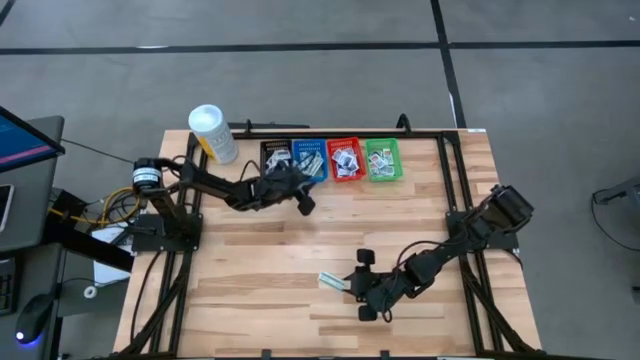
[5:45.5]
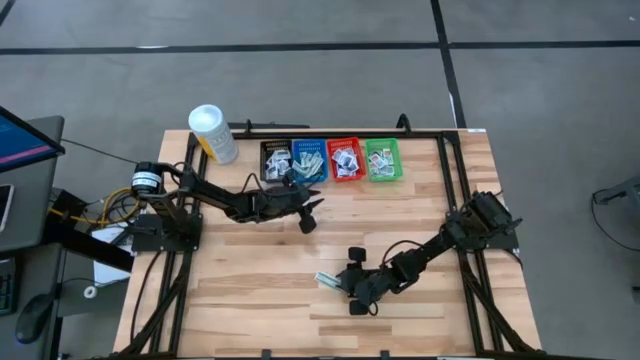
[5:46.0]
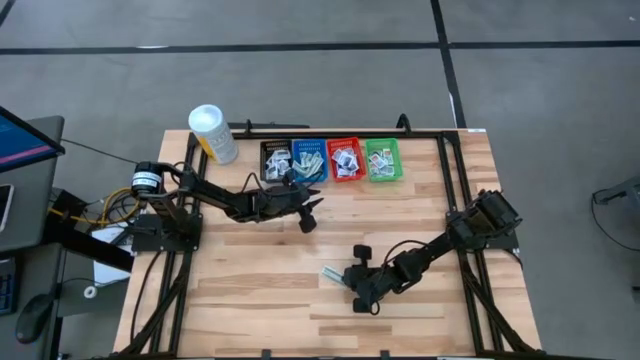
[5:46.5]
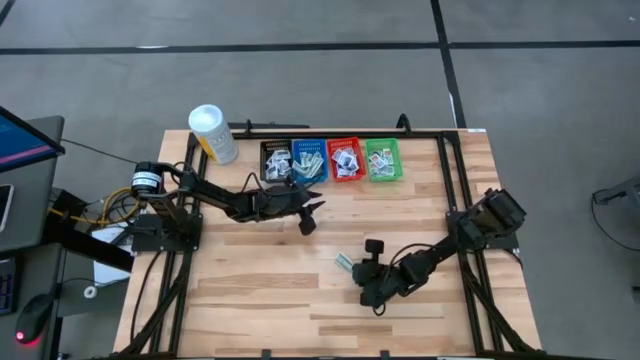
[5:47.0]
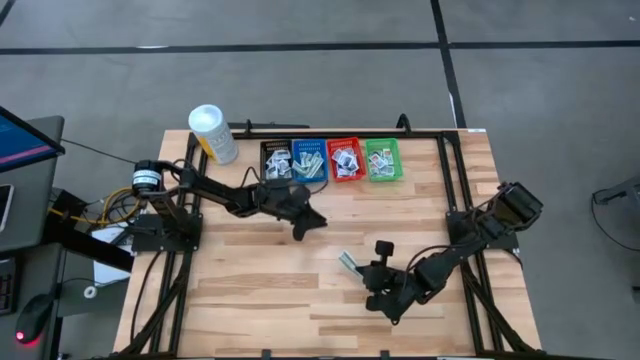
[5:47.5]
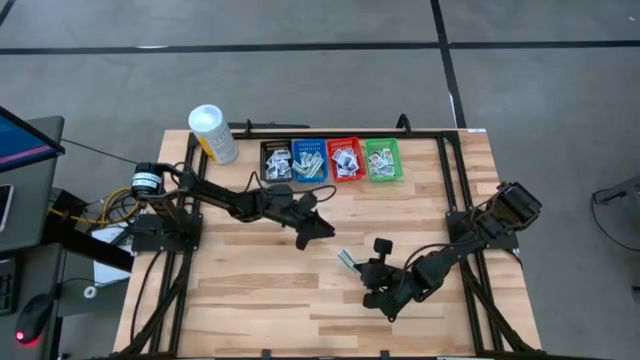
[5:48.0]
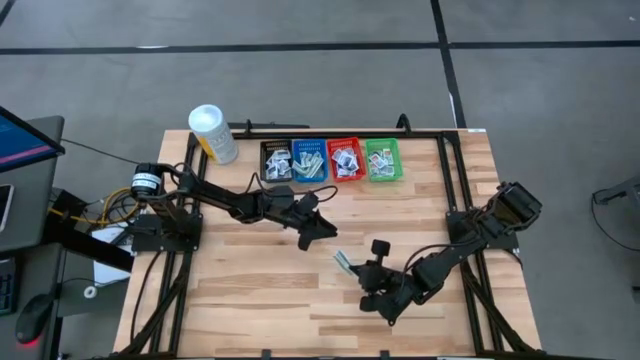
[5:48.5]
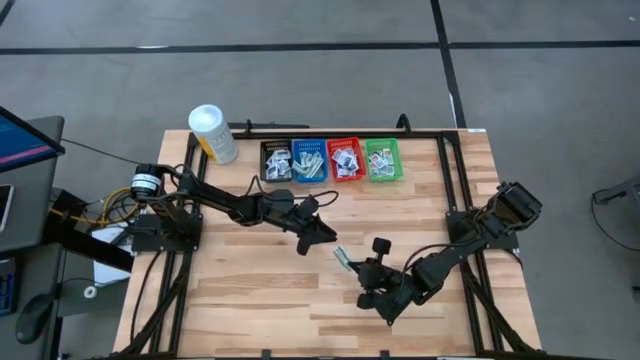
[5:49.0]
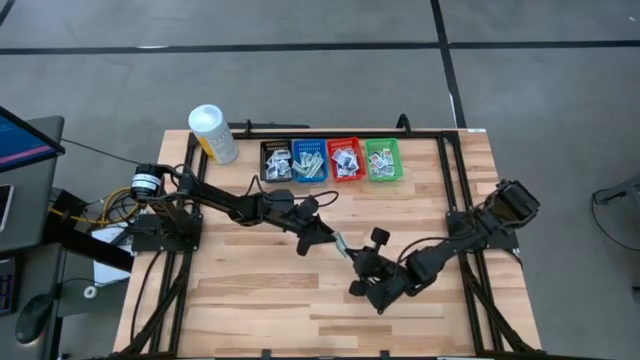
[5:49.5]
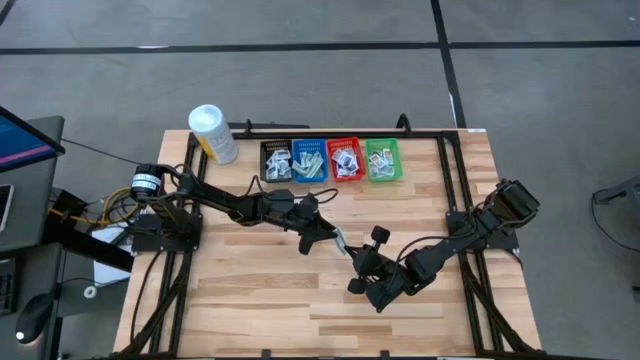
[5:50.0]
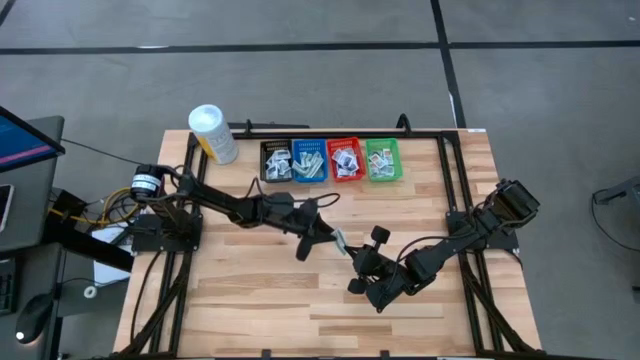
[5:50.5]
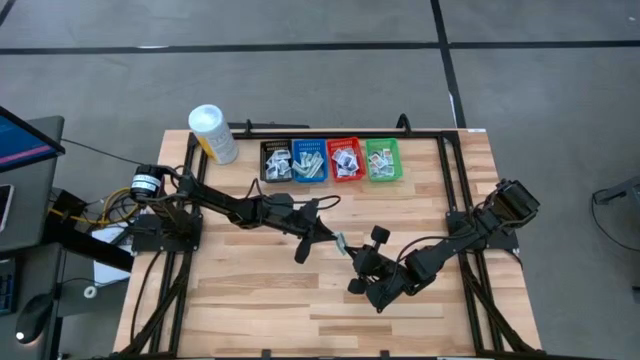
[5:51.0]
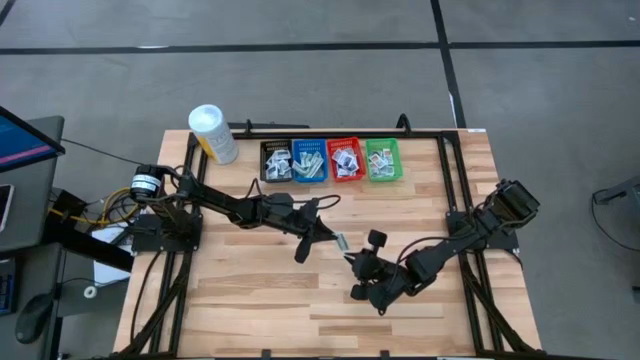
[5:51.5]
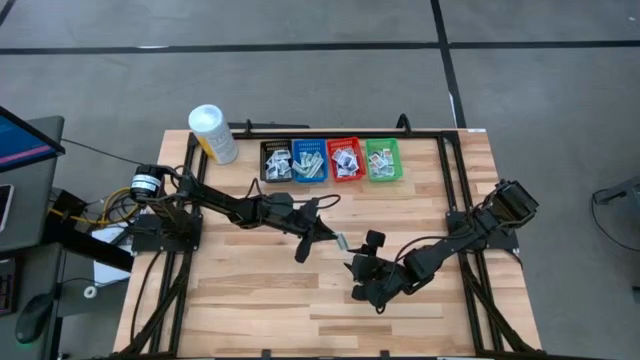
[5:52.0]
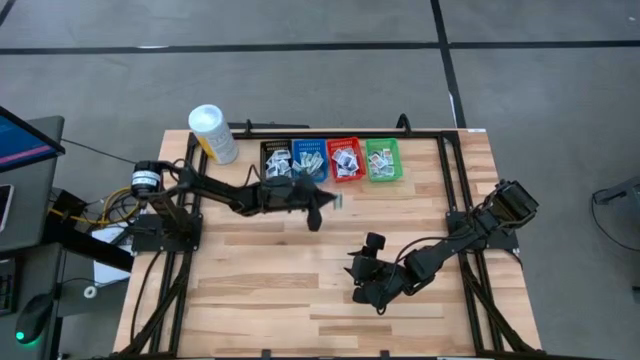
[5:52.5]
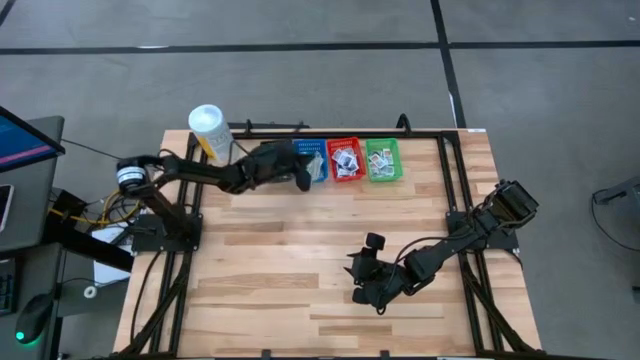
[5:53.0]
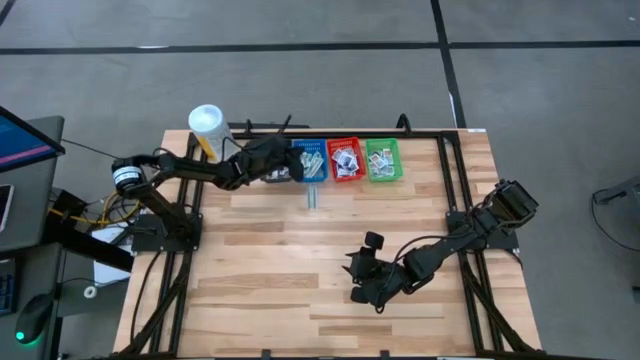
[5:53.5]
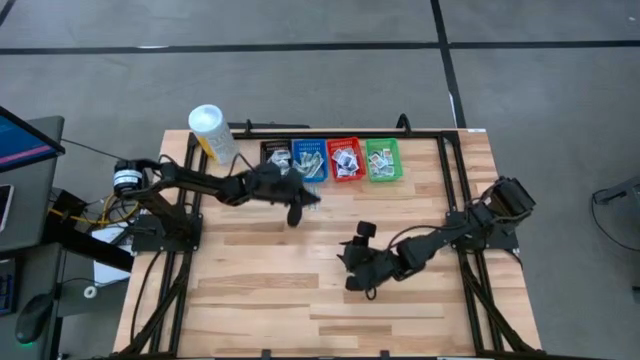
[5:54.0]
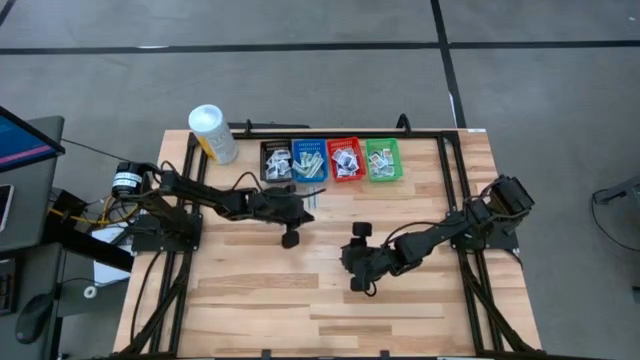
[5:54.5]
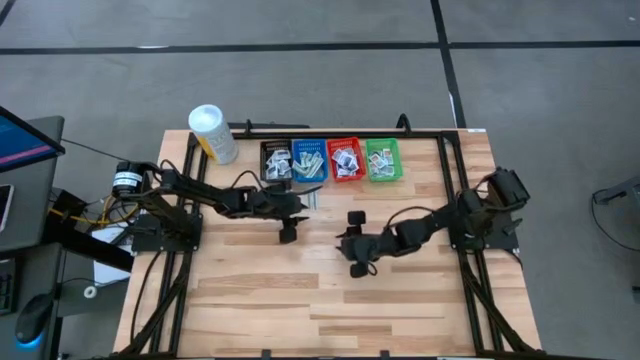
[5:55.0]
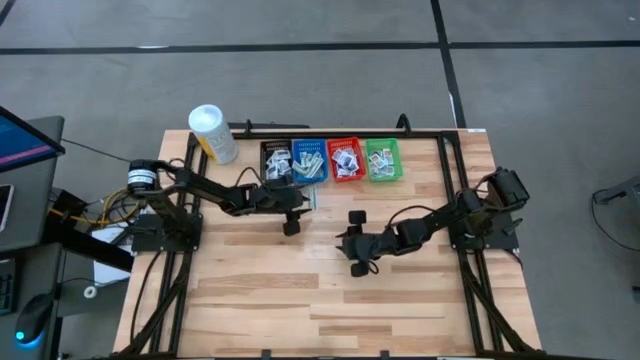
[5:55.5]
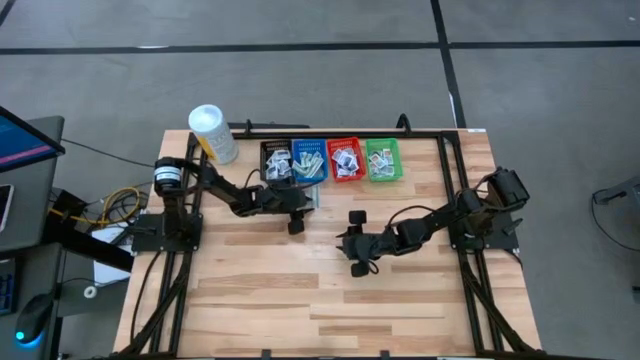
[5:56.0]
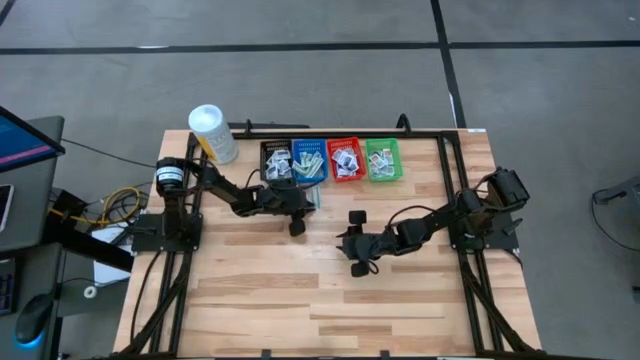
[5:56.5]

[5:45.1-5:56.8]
Task: Pick & Place First Aid Supplies
Put the green pad into the blue bin

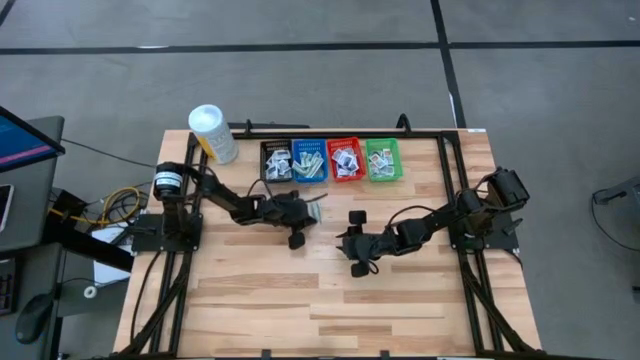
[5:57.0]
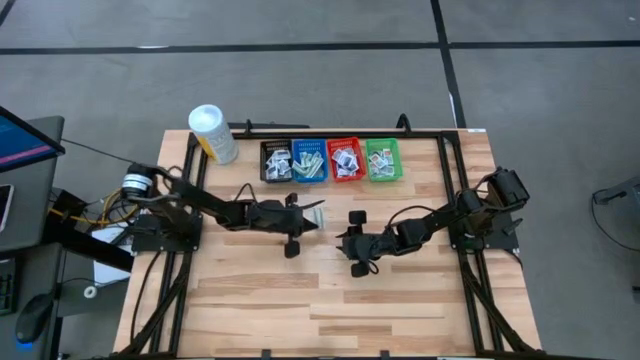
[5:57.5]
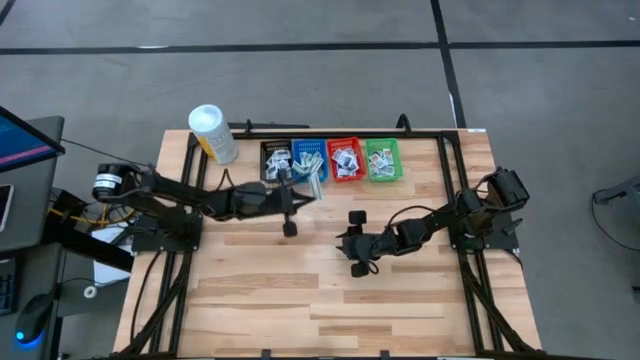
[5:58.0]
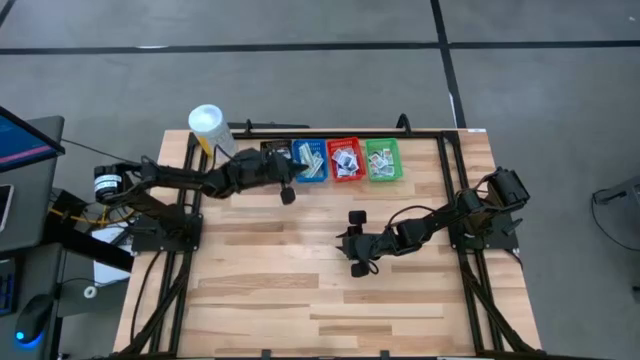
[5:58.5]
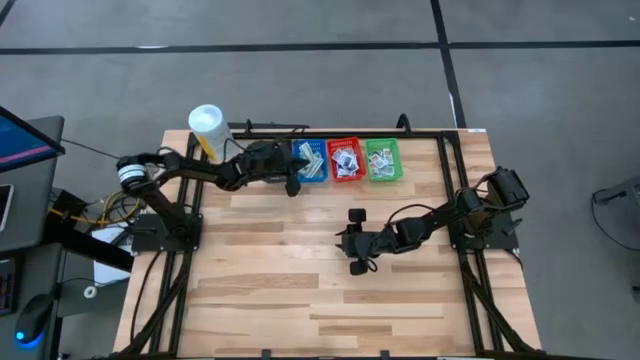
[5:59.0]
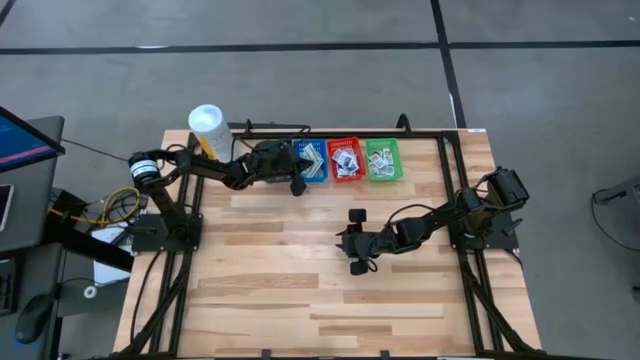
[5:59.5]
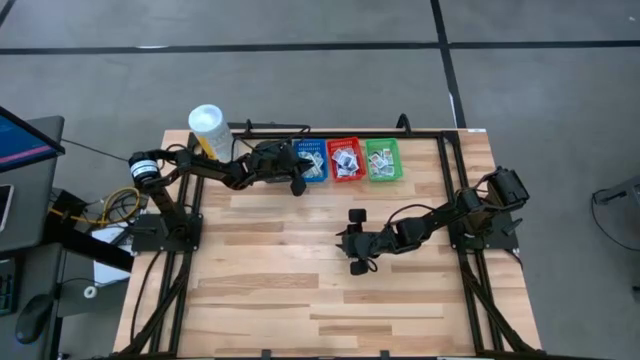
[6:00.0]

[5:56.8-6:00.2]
Put the green pad into the blue bin
